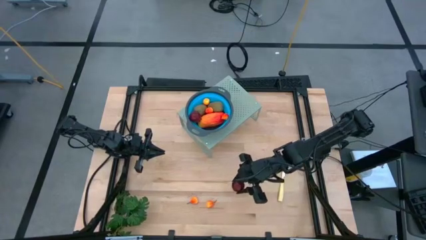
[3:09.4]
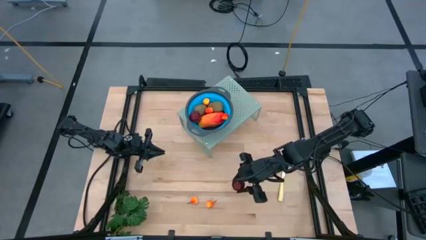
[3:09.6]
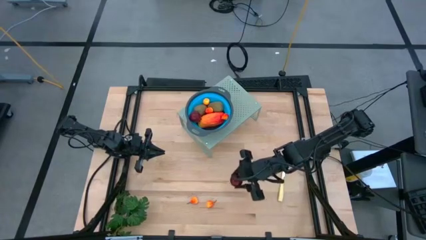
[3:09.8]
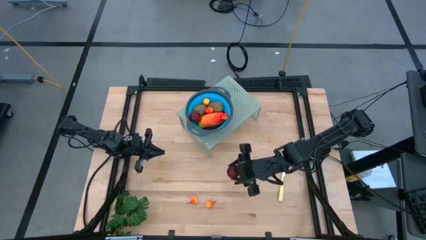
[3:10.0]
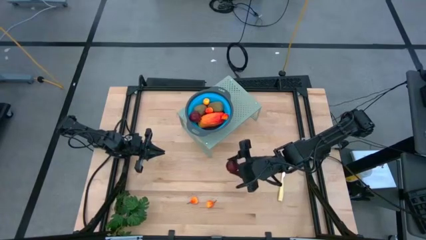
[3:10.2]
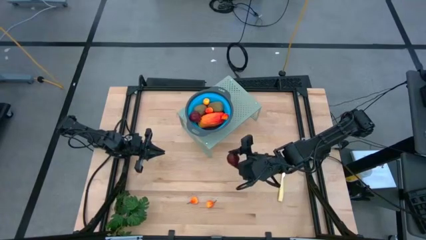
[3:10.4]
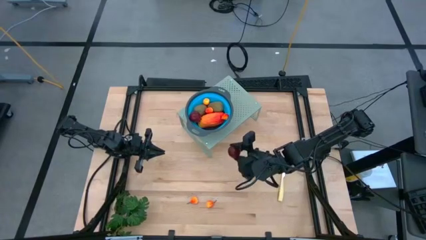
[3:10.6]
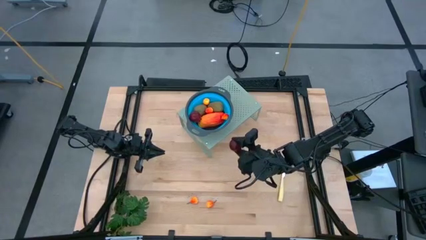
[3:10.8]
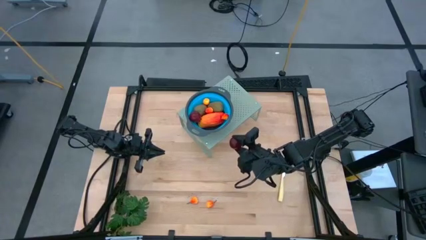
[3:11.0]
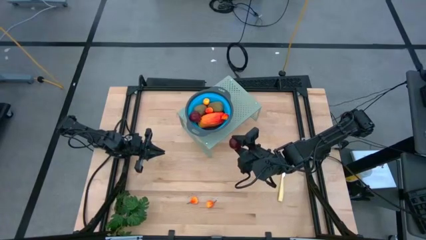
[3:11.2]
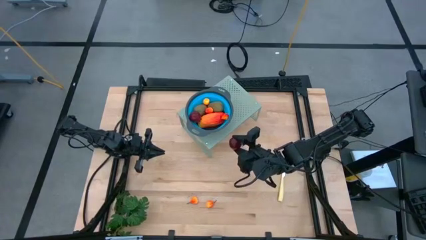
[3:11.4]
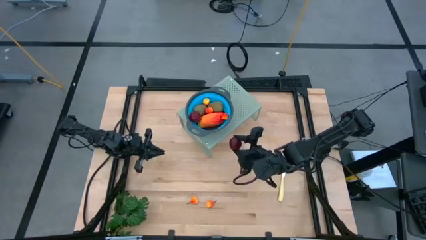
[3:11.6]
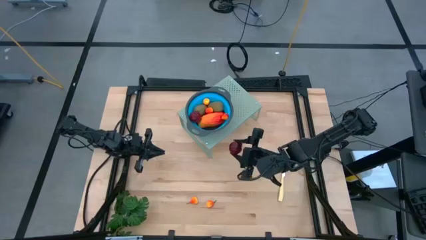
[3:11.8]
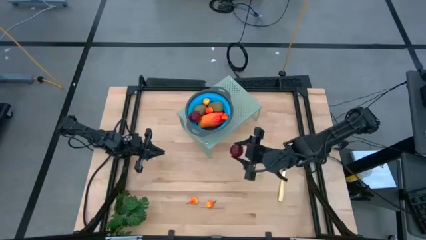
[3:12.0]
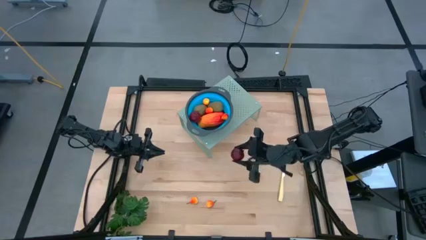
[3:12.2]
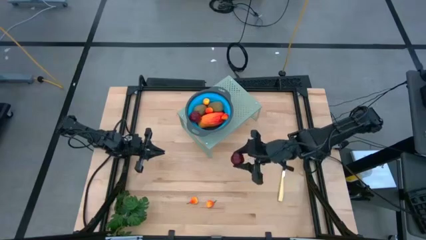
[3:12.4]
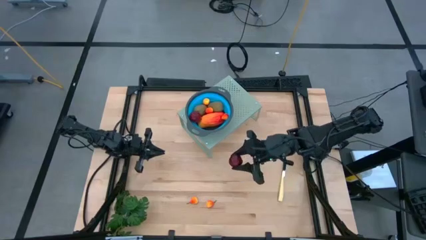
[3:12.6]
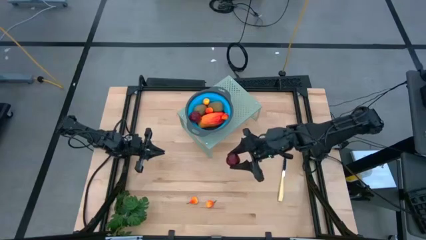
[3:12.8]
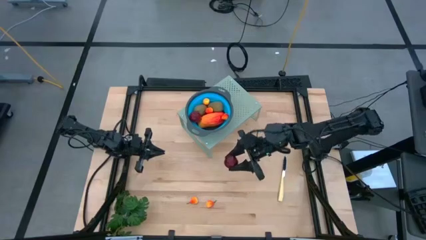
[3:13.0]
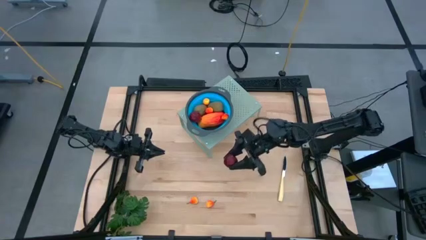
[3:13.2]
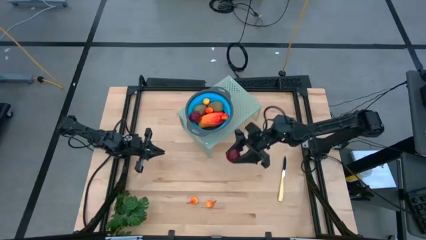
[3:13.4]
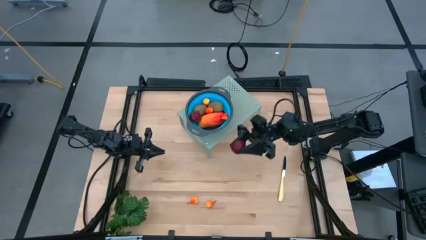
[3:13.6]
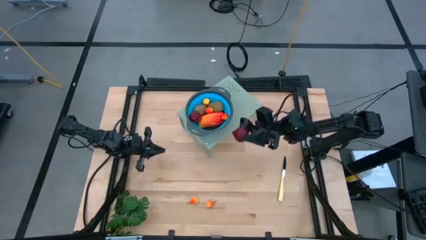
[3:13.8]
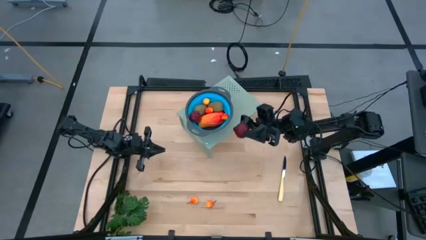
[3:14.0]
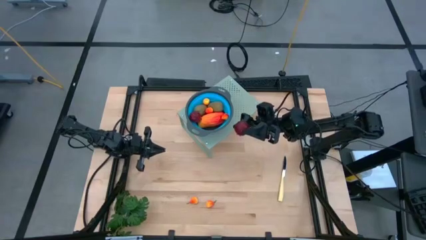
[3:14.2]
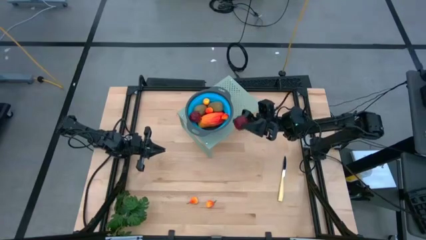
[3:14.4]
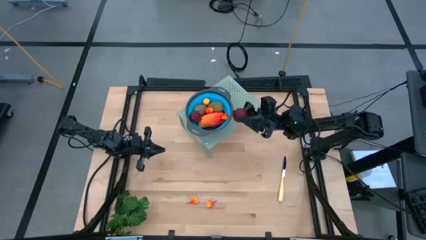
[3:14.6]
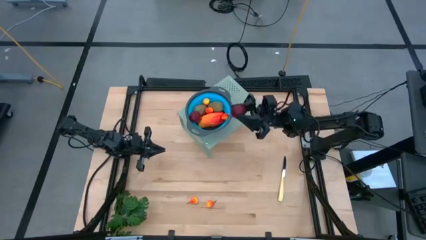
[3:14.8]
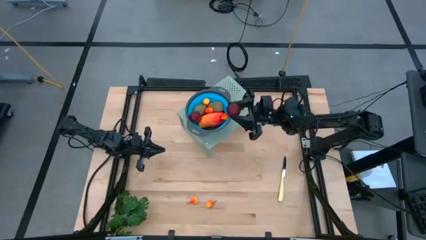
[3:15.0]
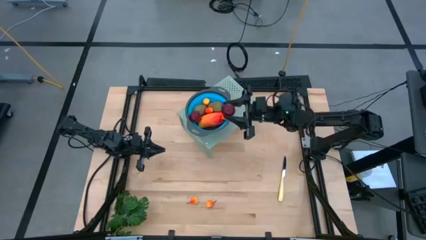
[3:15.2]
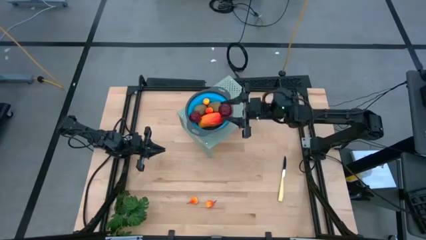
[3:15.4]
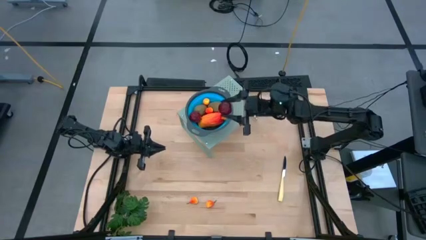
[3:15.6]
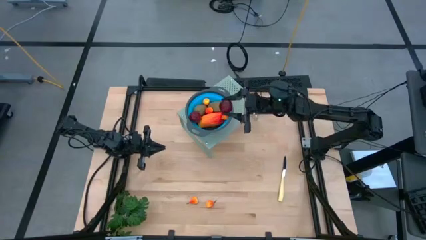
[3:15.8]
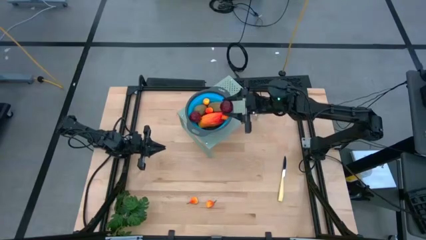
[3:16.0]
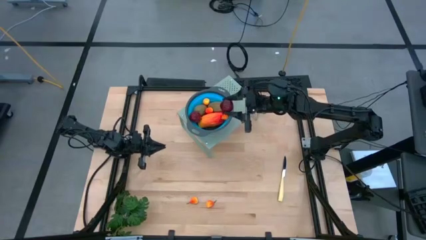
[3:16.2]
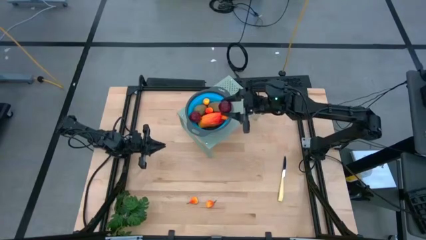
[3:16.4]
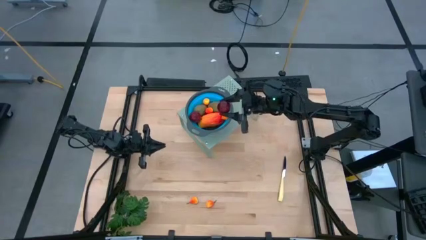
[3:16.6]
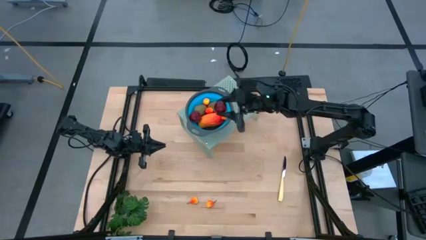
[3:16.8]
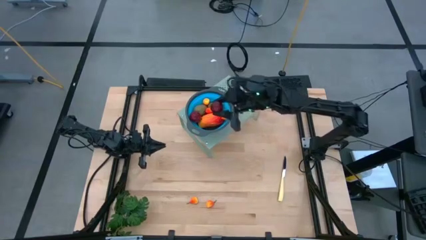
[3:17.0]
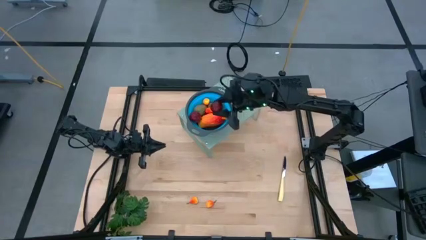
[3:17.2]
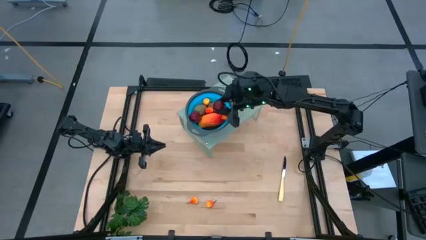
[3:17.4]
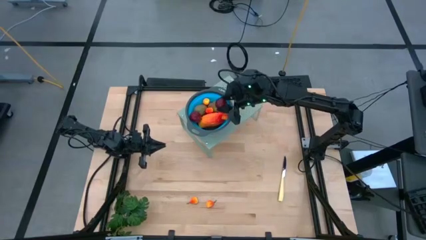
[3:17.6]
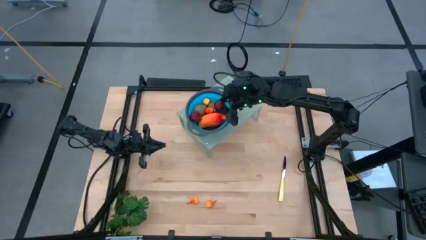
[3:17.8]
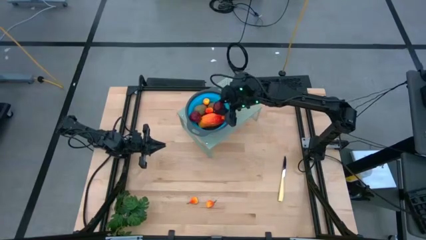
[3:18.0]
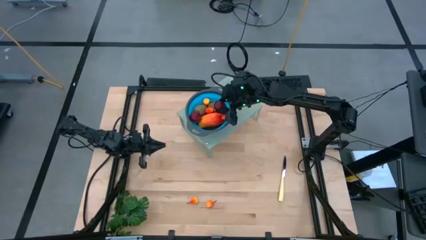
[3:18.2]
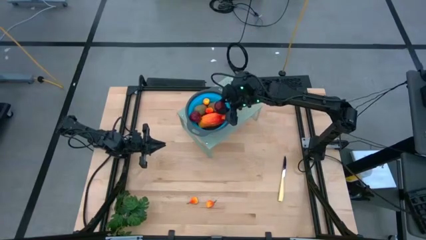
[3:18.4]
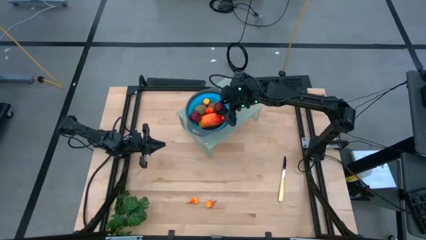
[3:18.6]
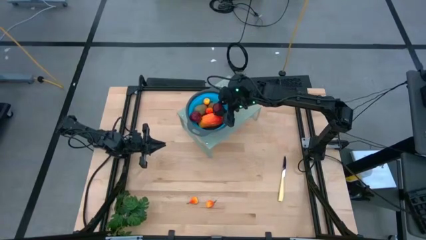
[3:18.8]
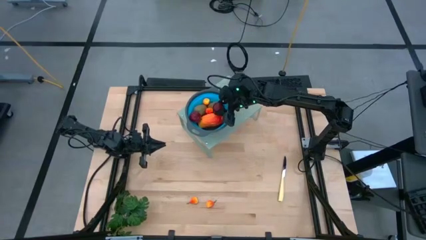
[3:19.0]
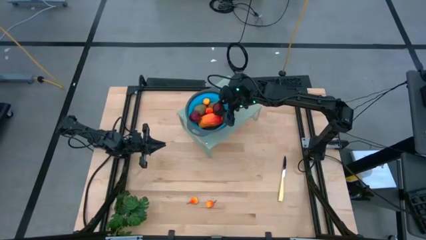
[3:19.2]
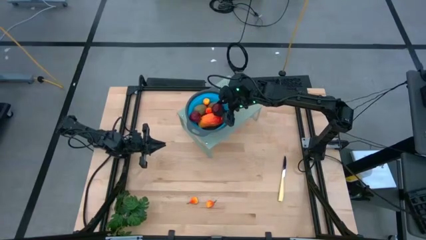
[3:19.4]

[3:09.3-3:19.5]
Task: Pick & Place Fruit
Put the red pomegranate into the blue strainer bowl on the shelf
